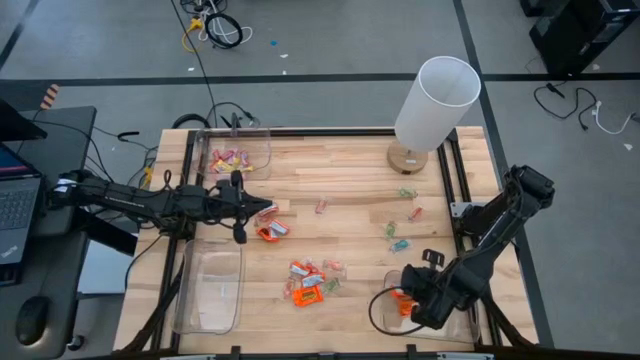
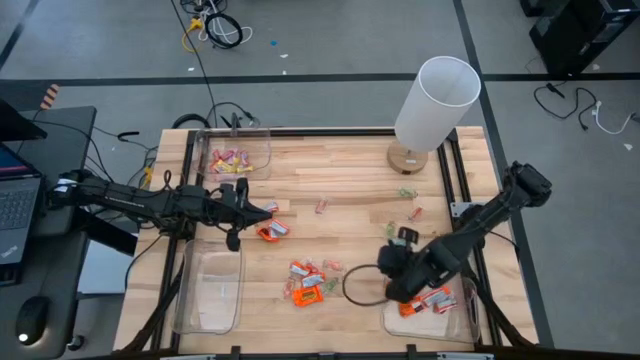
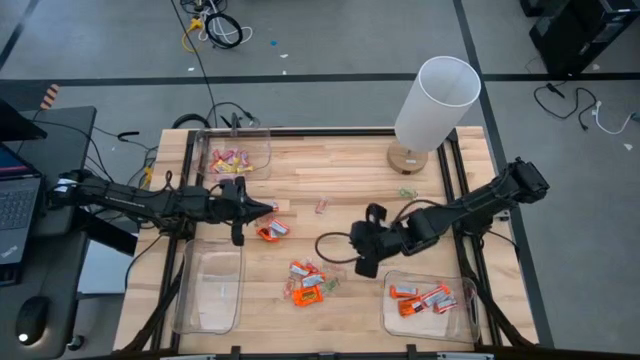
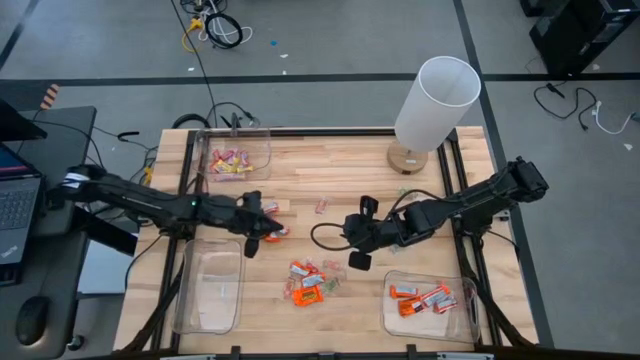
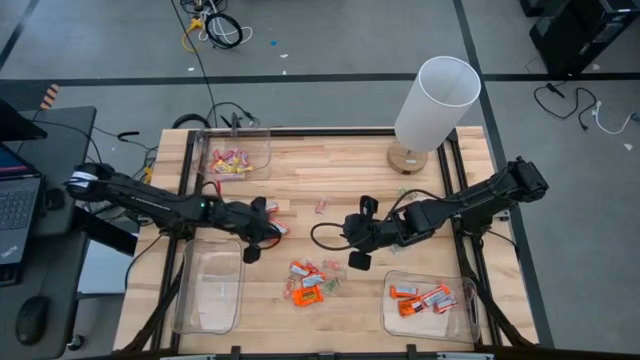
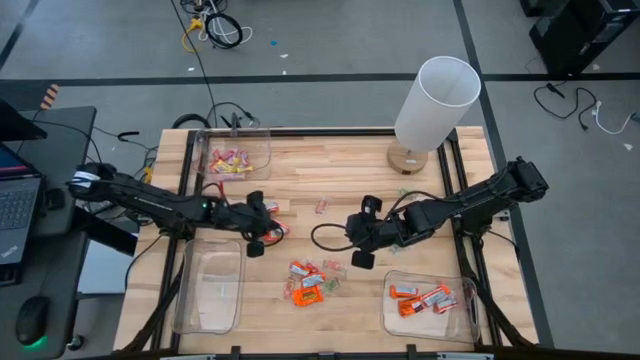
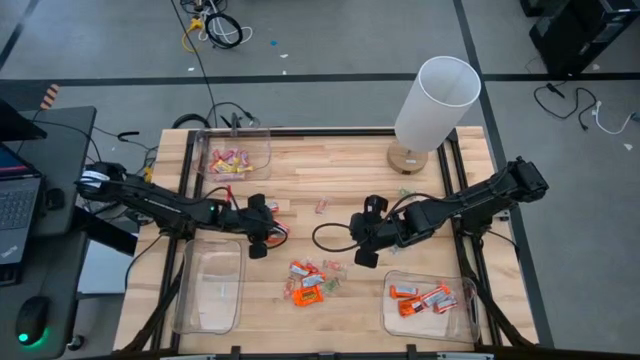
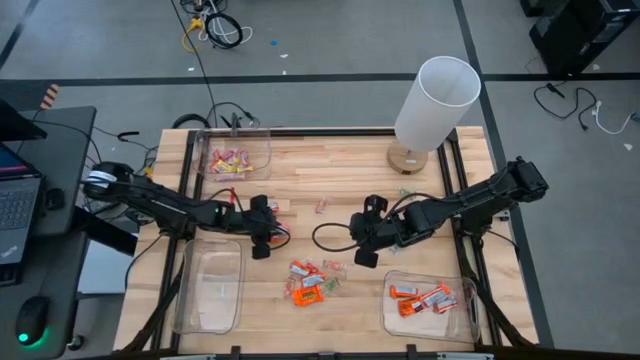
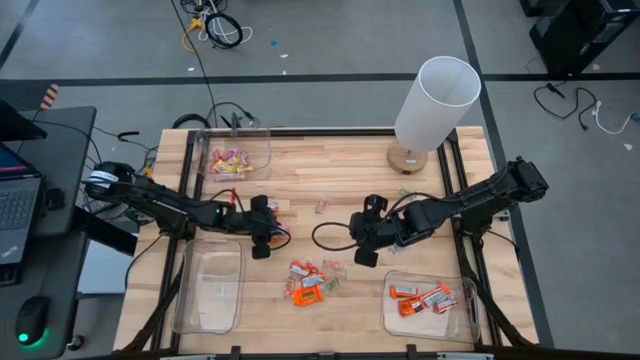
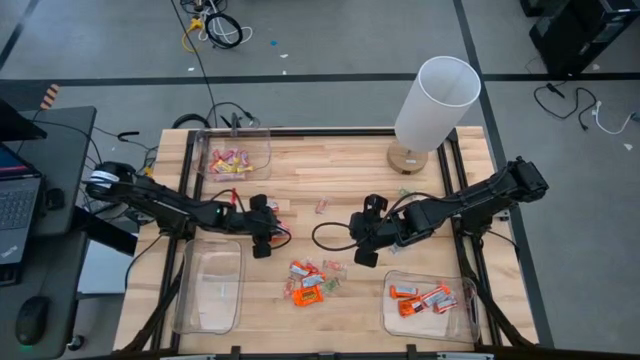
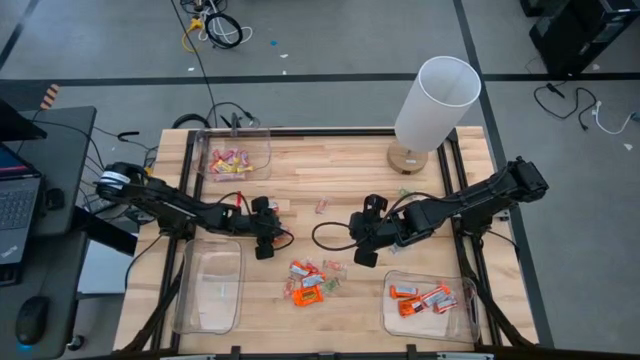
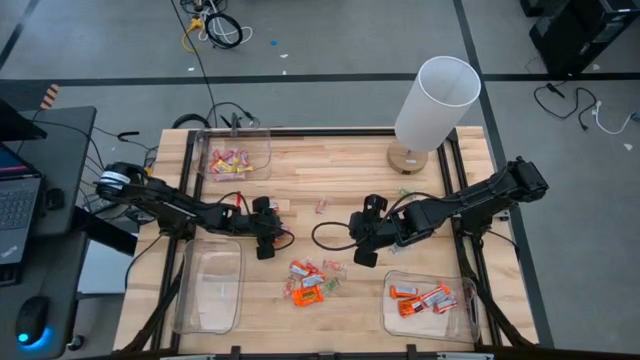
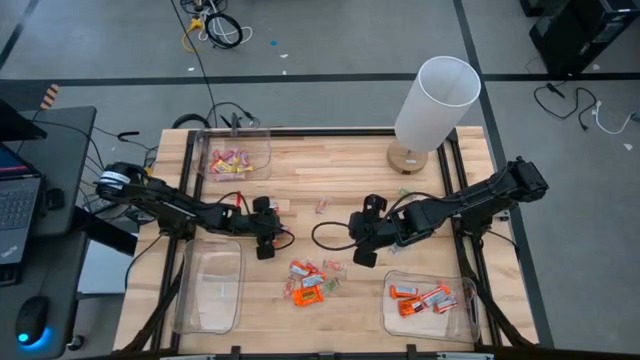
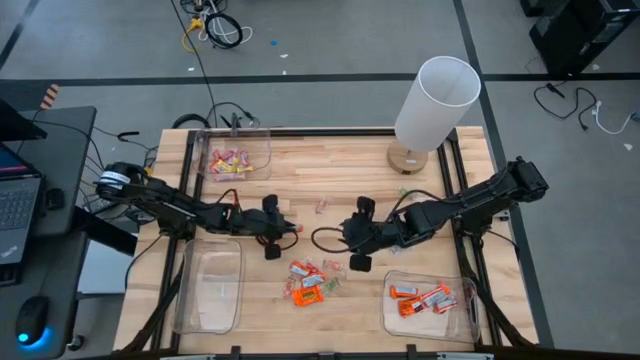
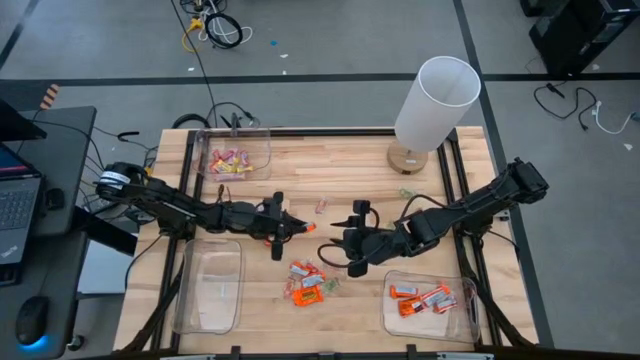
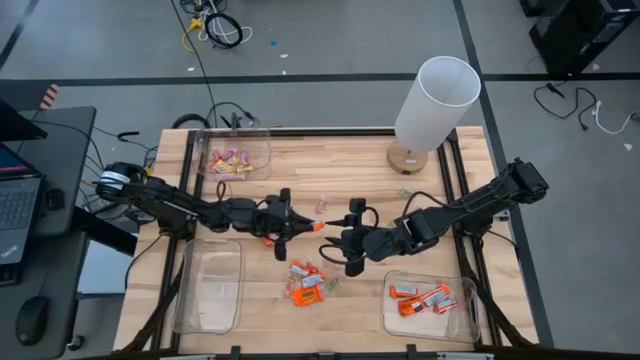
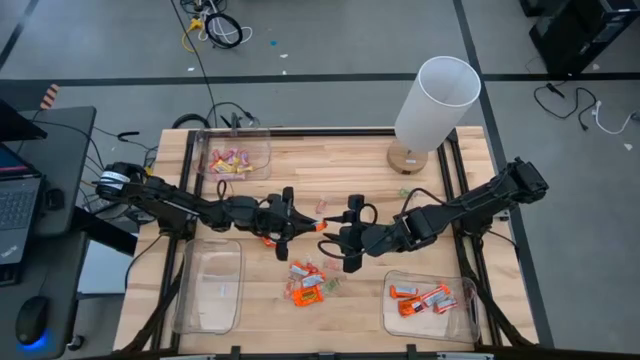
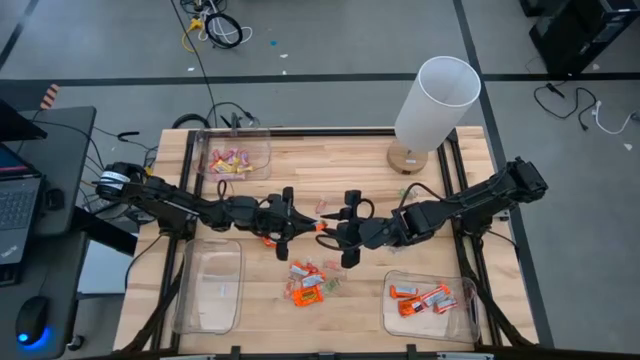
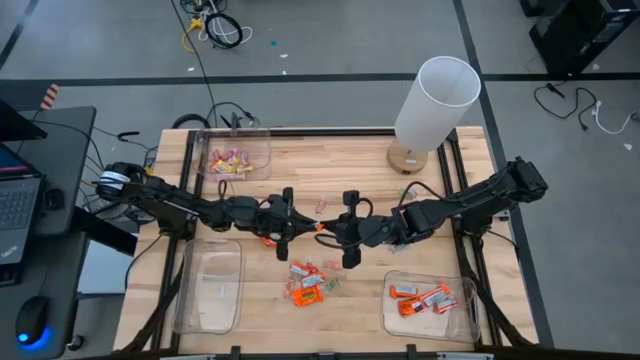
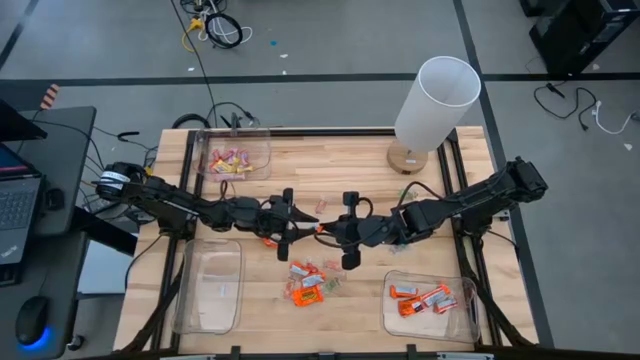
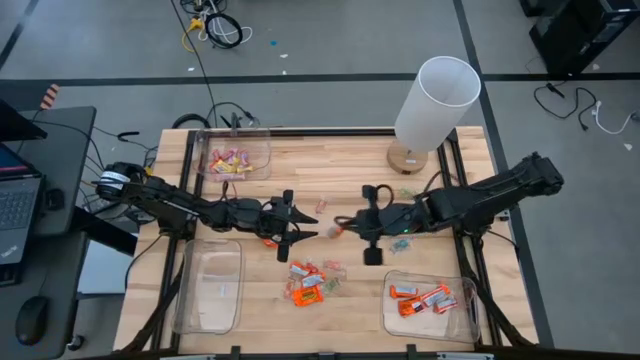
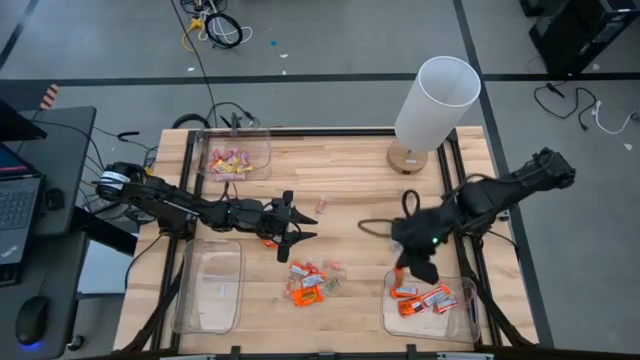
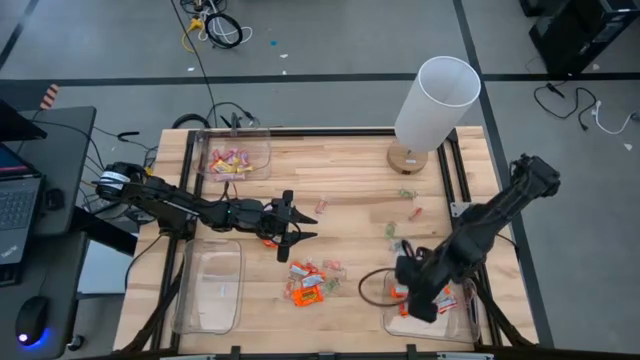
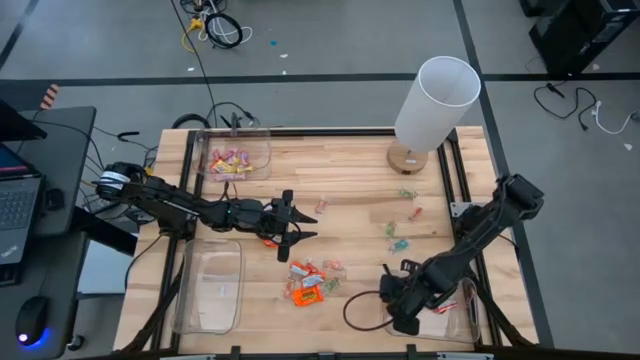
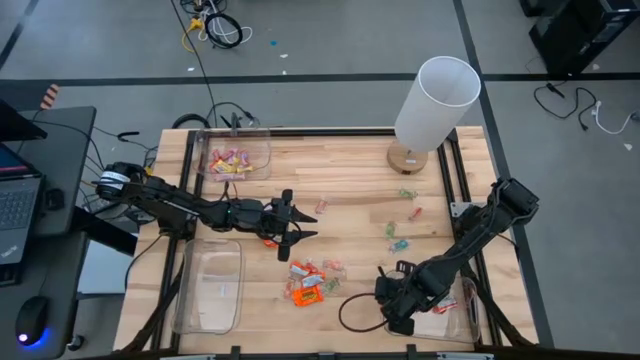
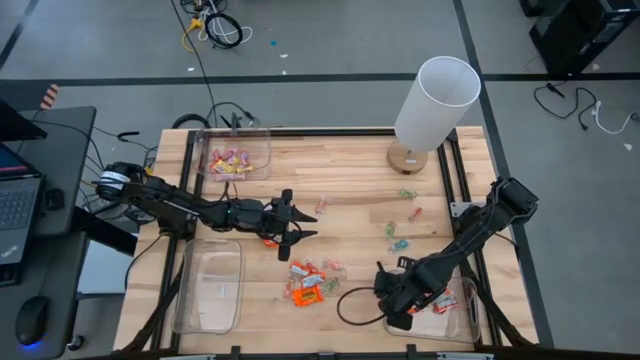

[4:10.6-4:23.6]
Task: Sort candy
Put the chocolate into the bottom right transparent bin

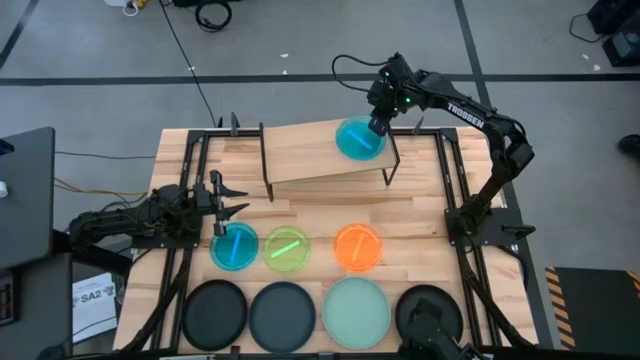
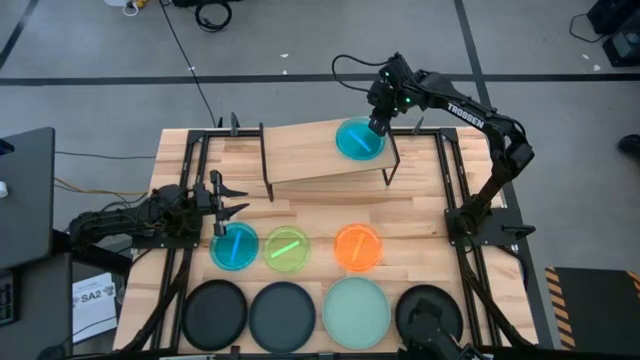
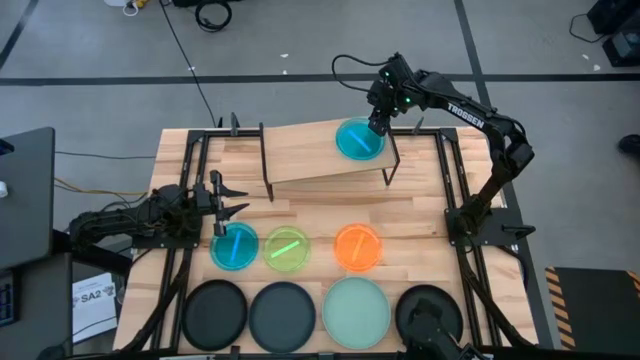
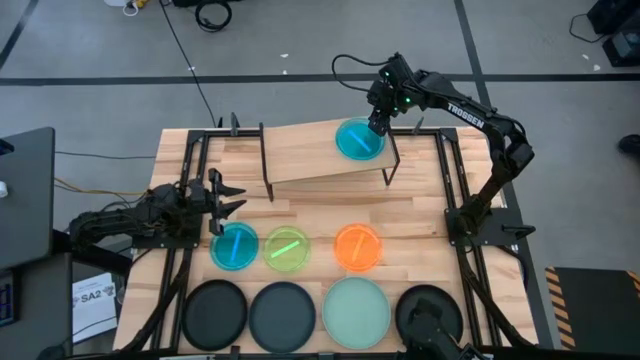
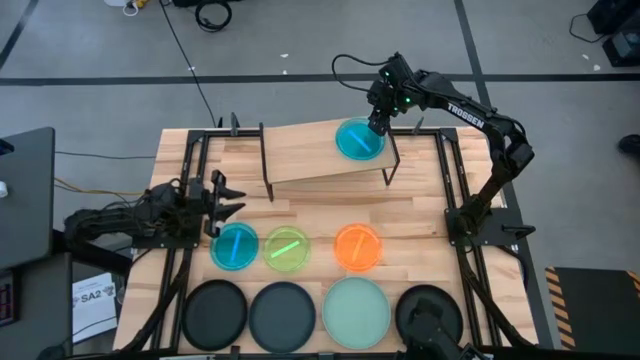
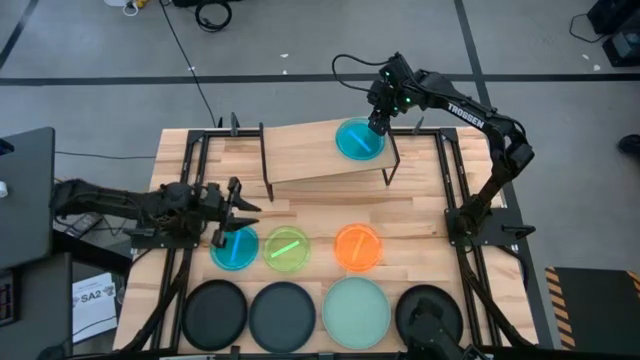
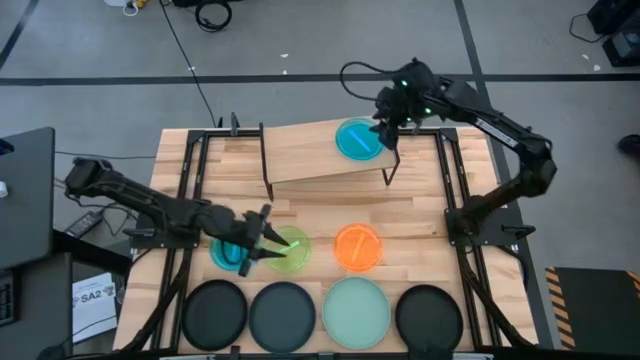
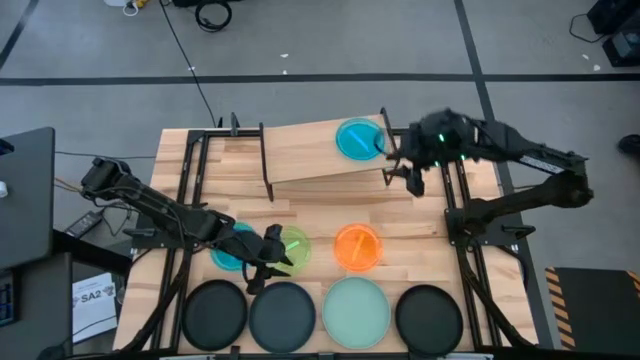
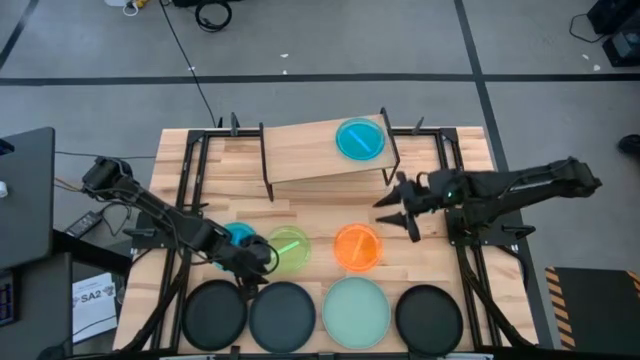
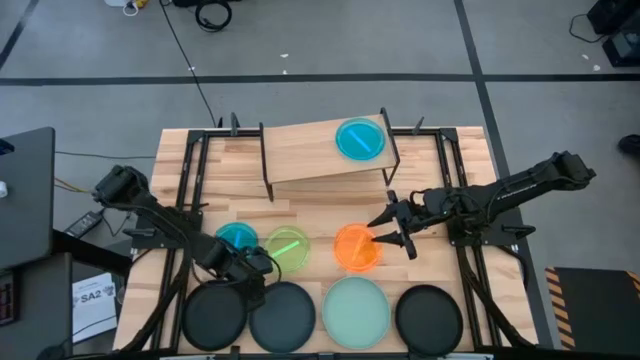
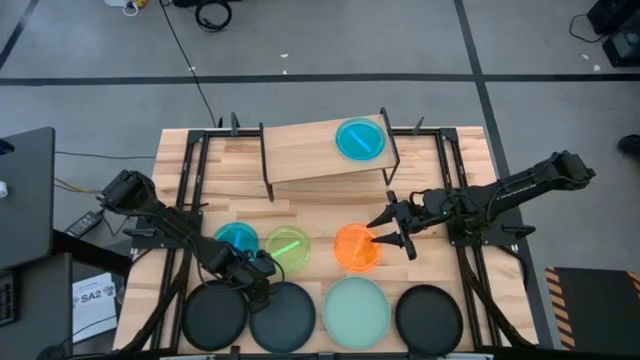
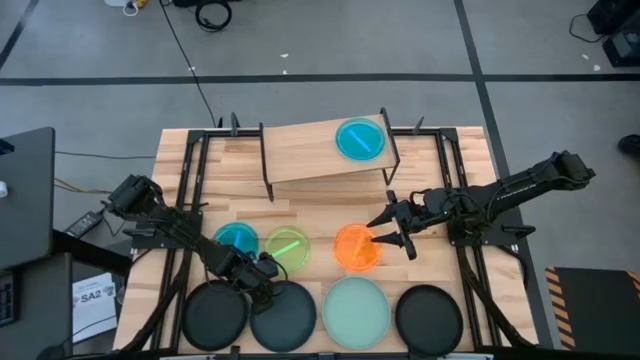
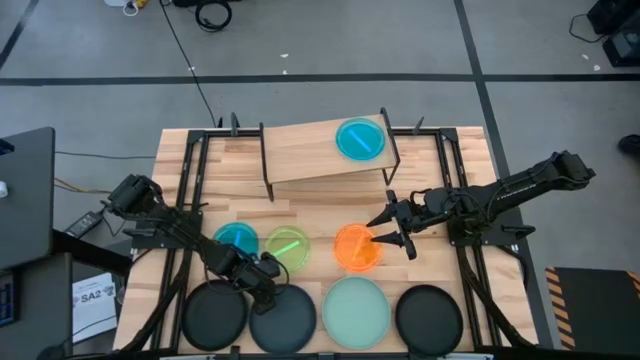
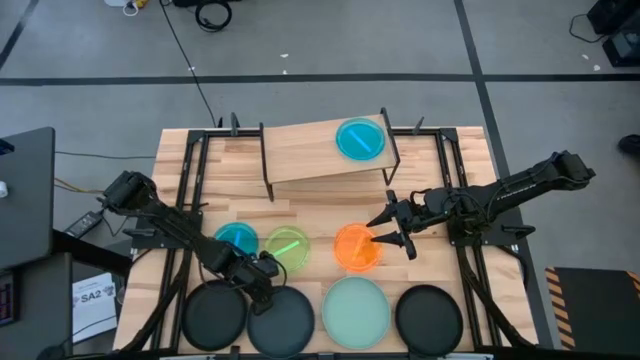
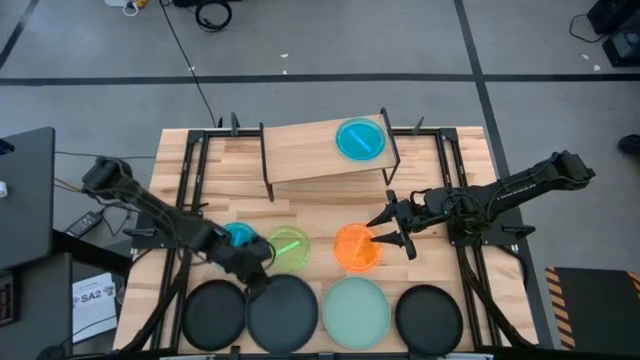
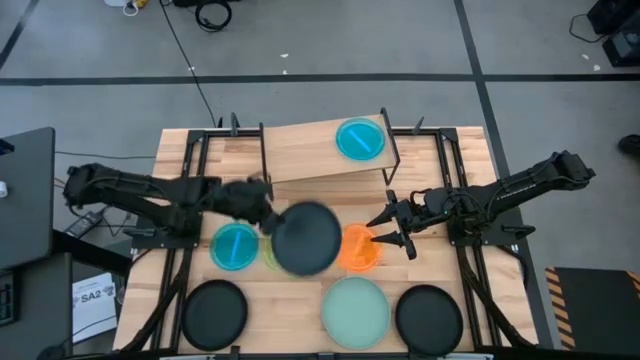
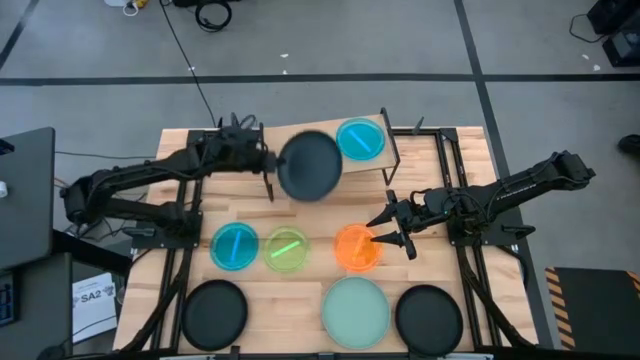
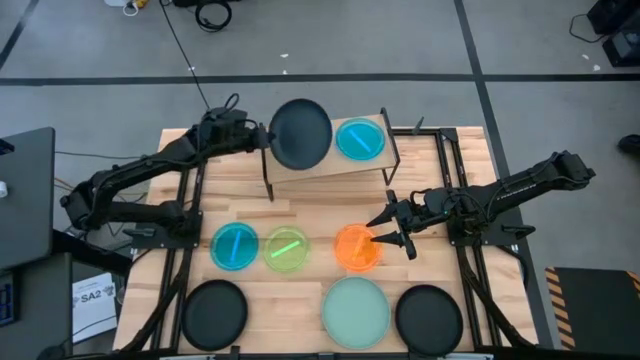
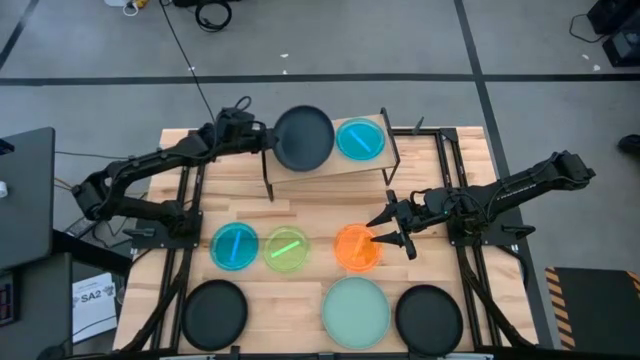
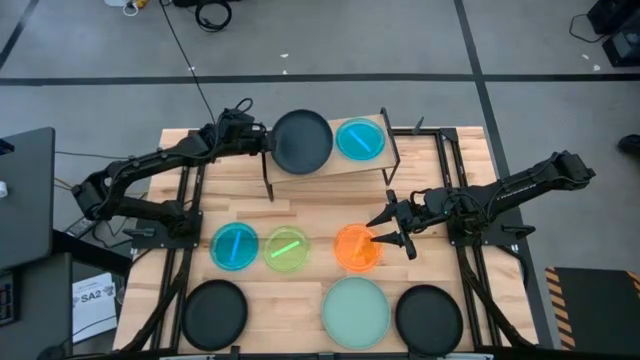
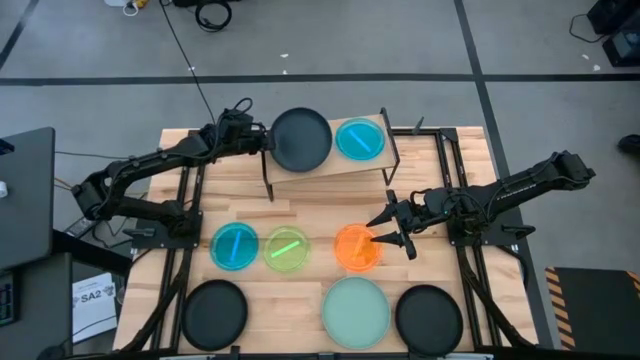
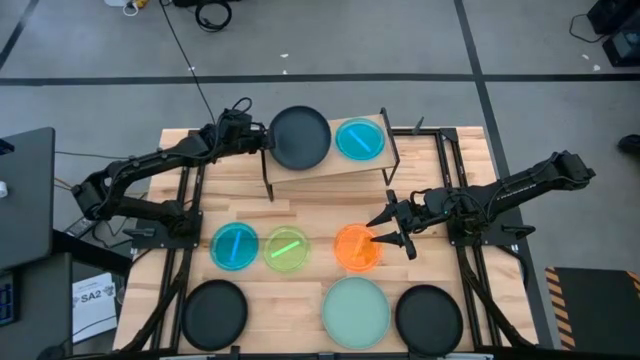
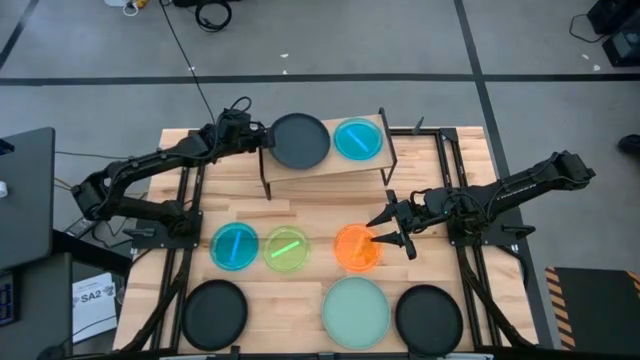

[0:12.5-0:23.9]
Task: Place and stack plates onto a shelf
Put the dark green plate on the shelf
